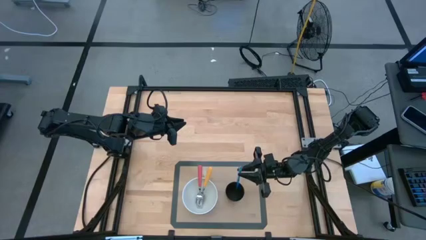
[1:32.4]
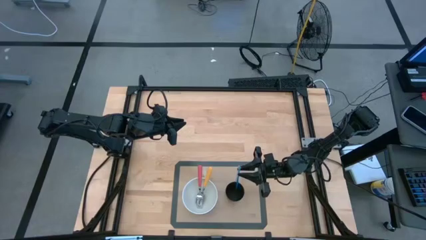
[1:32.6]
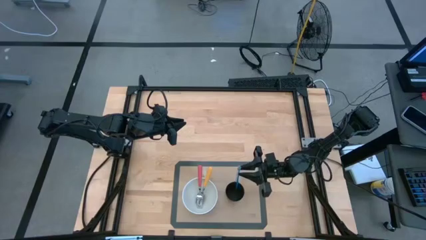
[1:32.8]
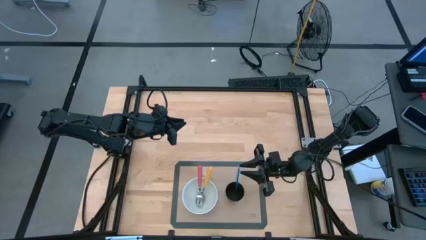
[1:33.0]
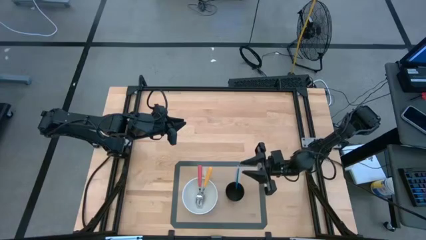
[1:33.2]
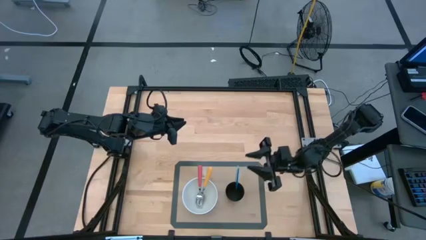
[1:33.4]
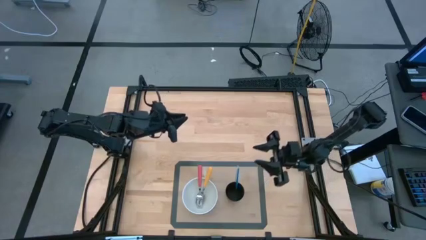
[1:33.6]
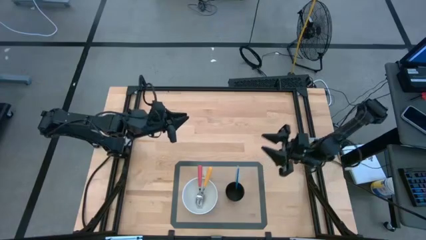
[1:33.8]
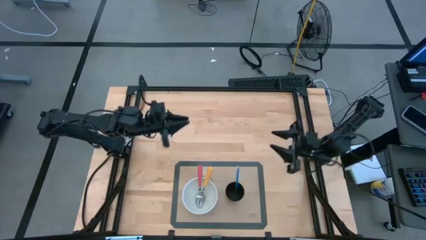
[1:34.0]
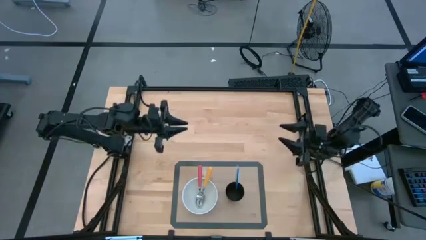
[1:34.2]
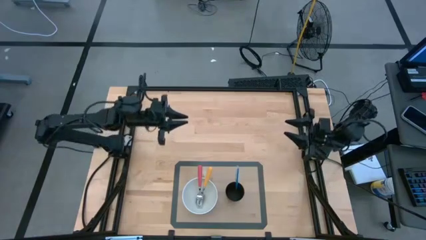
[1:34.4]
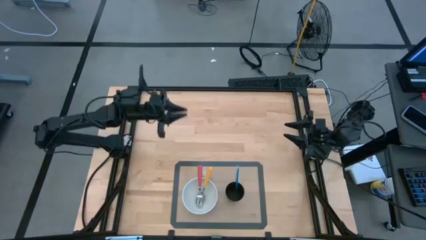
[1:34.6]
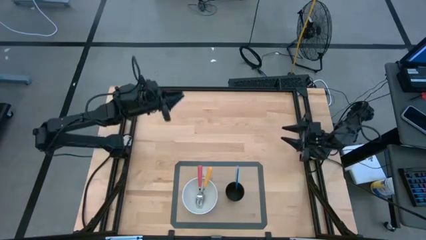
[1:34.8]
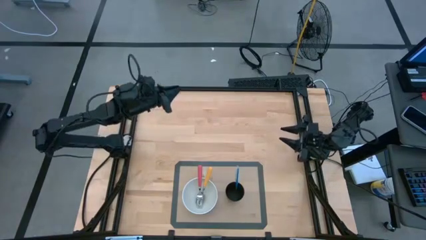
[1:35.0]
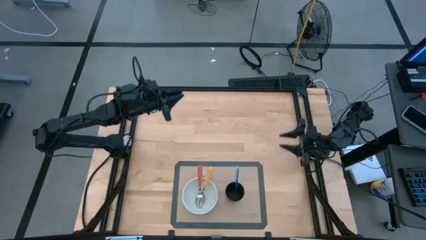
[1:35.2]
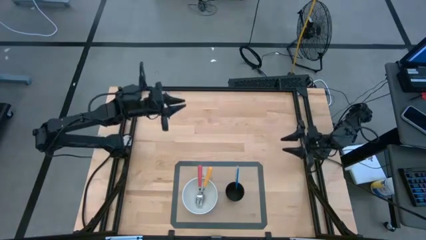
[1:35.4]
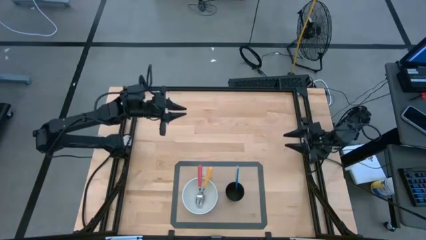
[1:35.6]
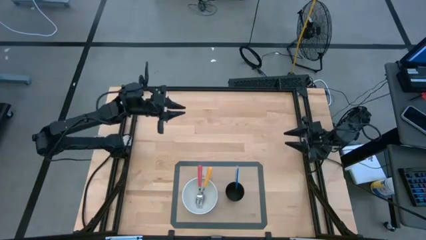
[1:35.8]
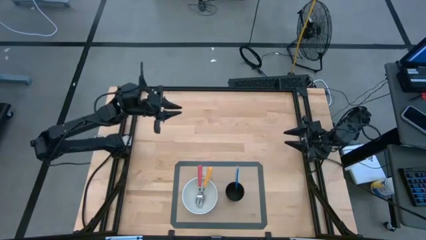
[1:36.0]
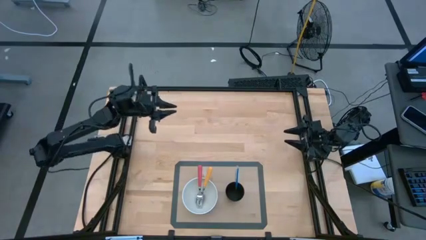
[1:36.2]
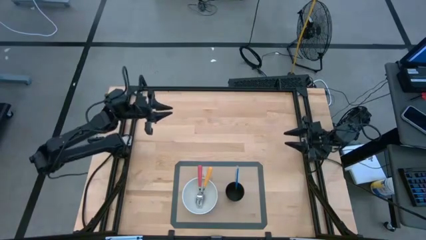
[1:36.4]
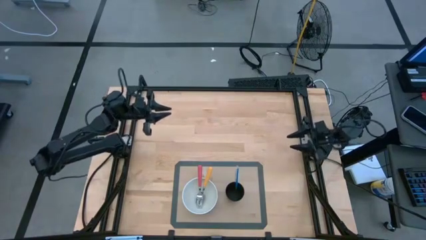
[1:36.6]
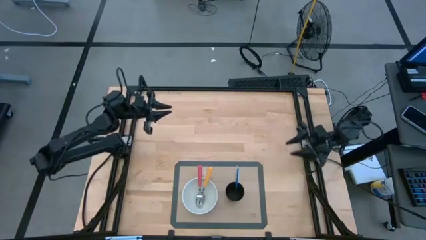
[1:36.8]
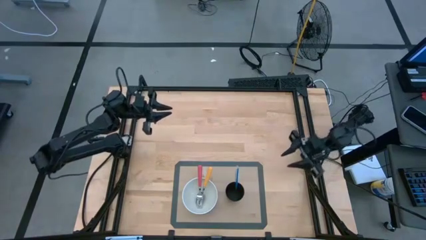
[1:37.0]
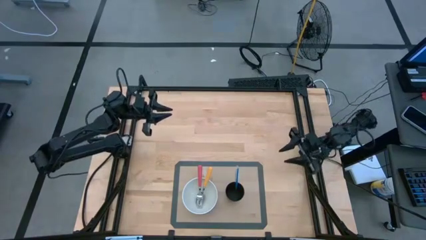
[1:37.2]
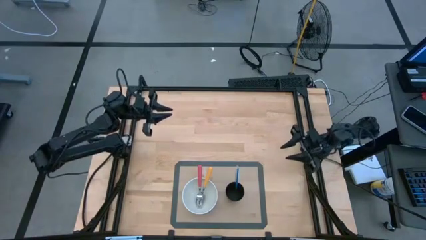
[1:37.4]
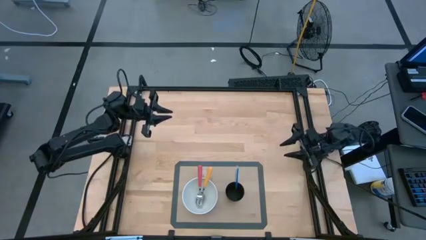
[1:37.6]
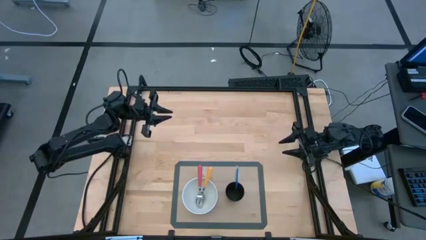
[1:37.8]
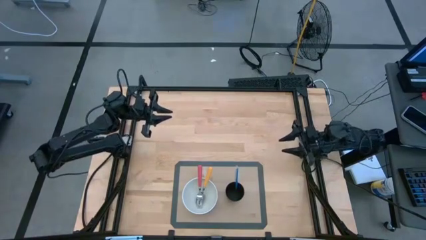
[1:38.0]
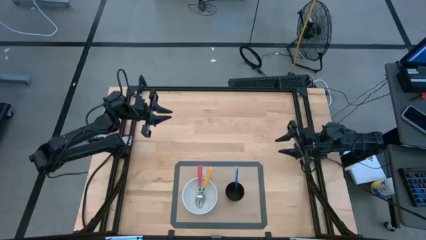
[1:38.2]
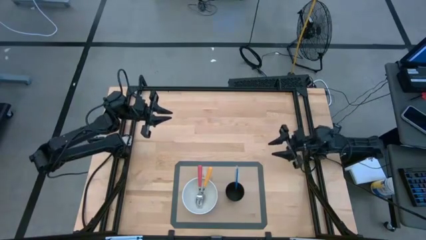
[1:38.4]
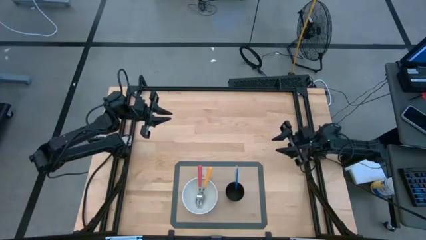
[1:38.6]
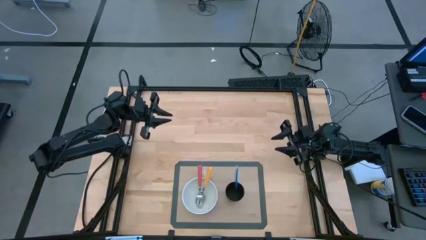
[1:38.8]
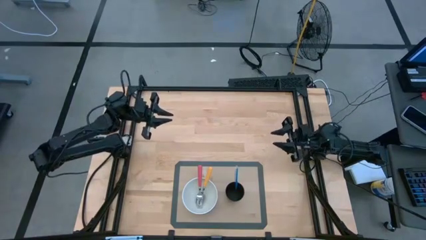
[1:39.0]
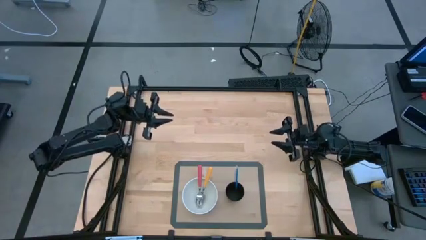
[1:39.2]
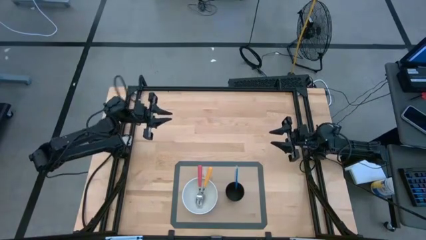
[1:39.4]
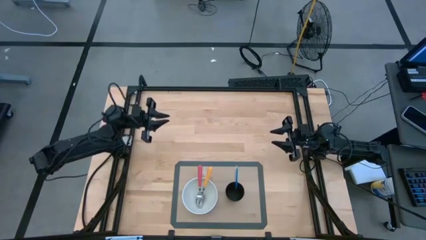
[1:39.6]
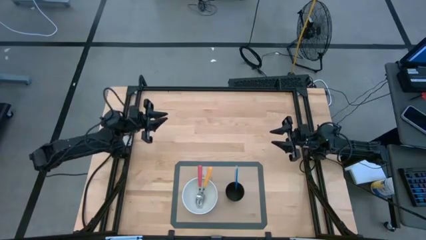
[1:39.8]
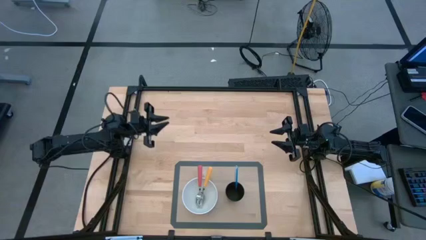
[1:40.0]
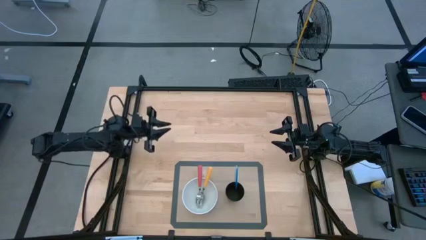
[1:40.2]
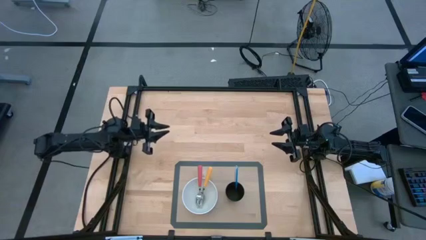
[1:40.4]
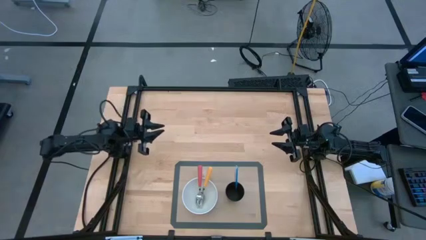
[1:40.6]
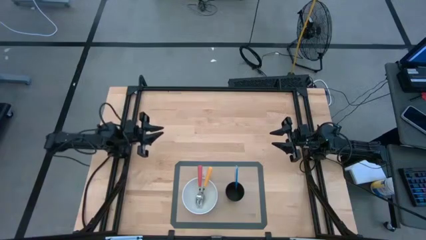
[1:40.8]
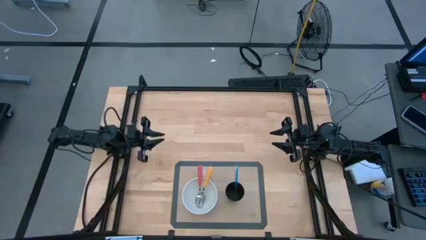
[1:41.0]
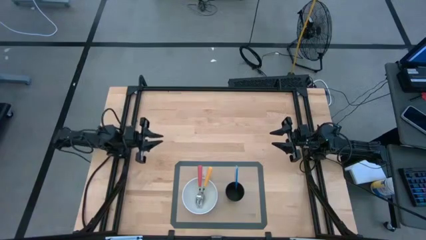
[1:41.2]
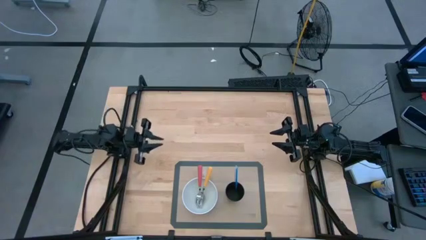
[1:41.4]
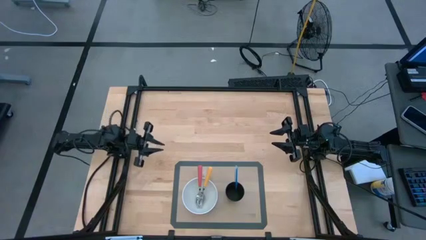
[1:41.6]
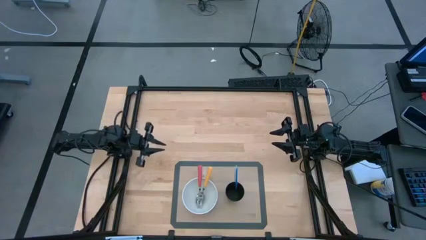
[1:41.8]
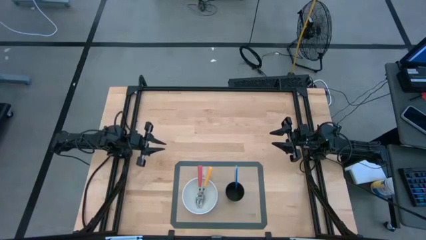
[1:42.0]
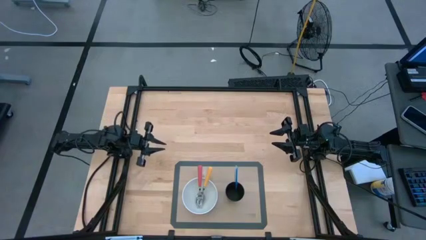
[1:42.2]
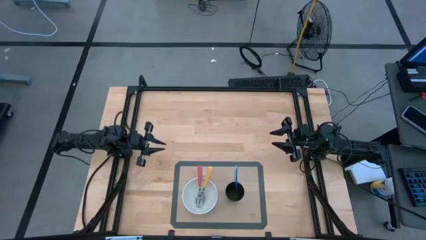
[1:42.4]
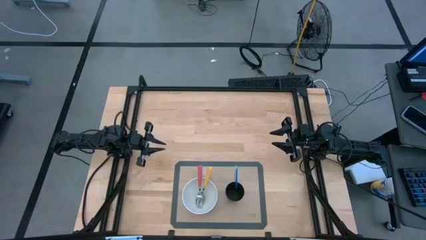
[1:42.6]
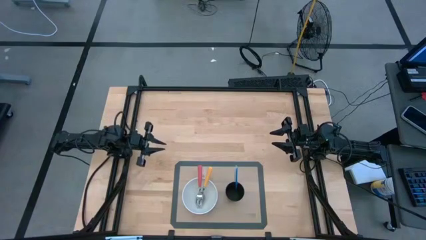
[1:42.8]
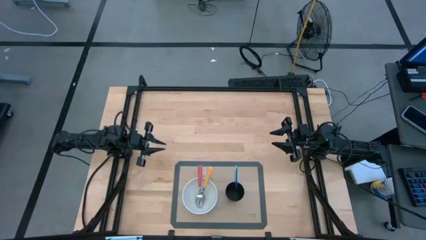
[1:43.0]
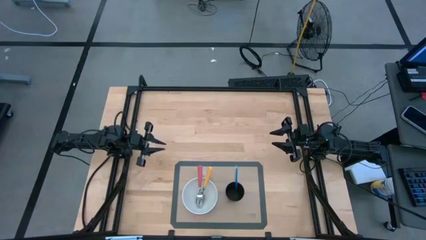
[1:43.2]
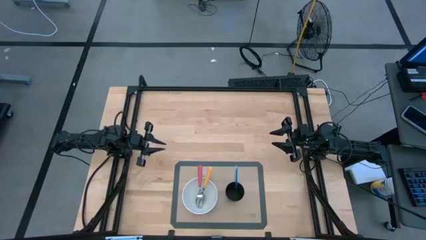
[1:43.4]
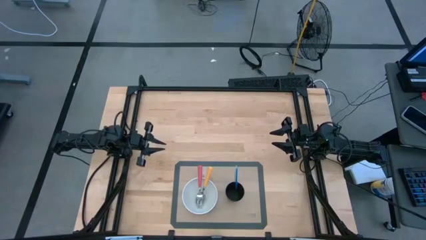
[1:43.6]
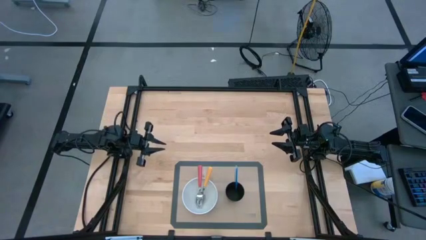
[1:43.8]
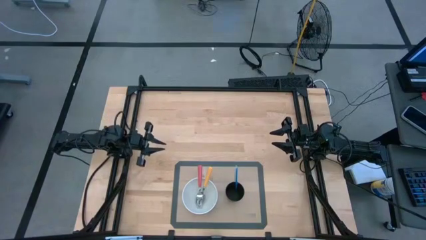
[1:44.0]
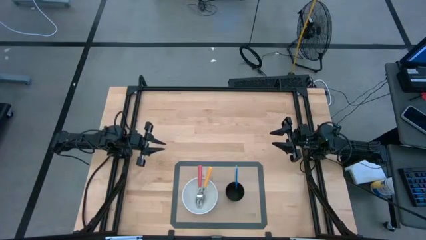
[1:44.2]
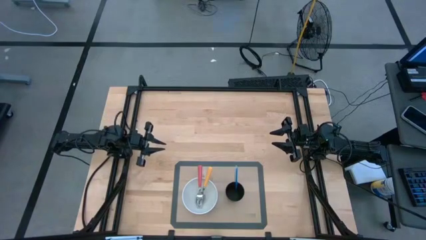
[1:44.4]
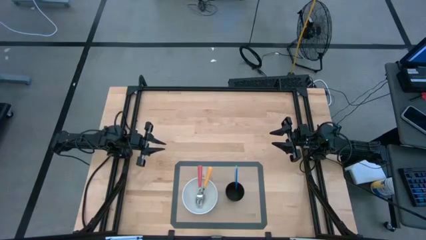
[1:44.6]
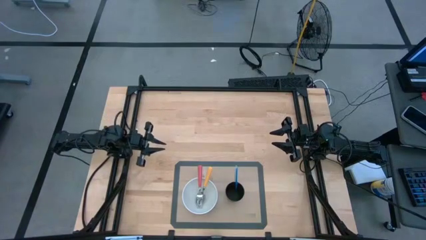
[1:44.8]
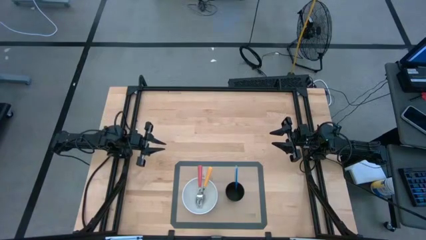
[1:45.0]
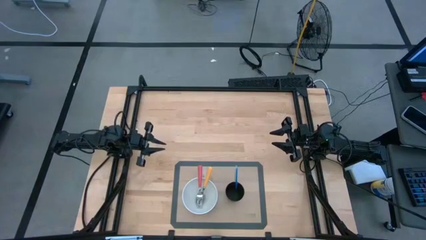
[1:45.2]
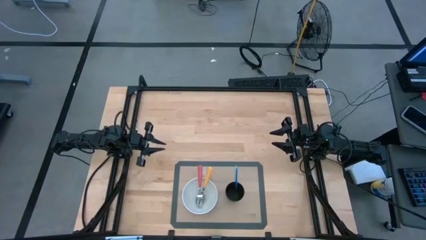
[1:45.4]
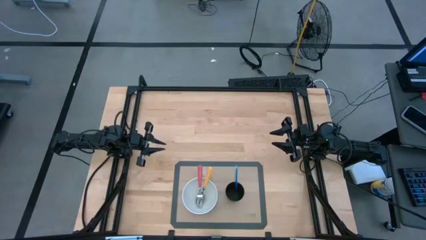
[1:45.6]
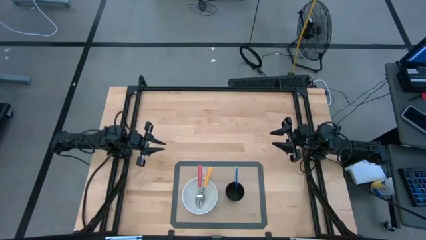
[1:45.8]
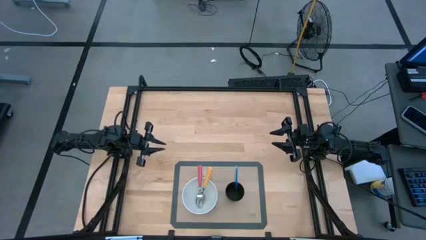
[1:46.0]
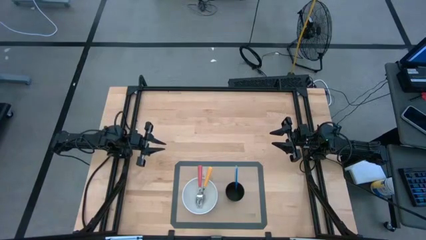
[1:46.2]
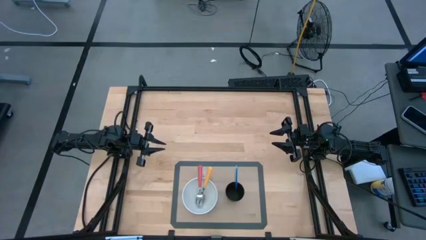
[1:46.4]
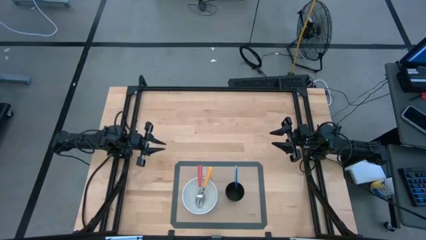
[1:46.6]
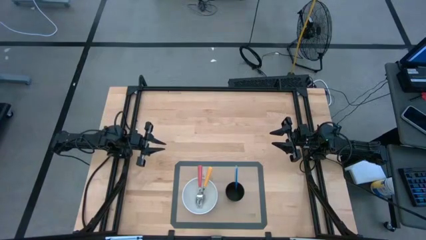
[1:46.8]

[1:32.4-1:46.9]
Task: Pick & Place Utensil
Return to Home Position

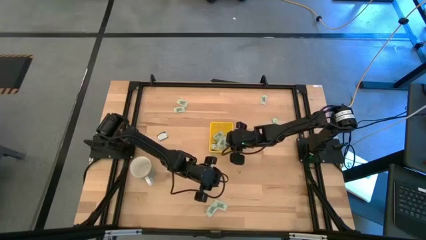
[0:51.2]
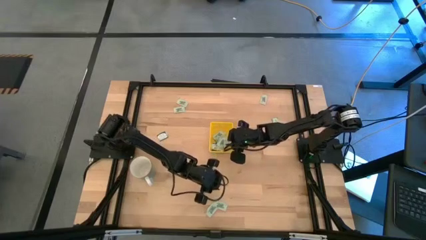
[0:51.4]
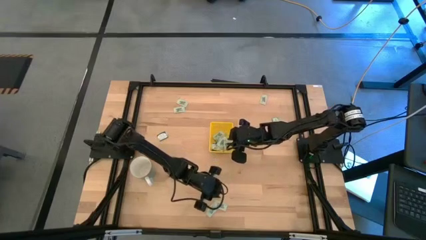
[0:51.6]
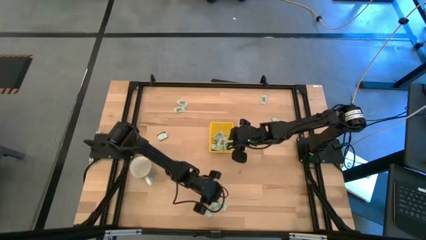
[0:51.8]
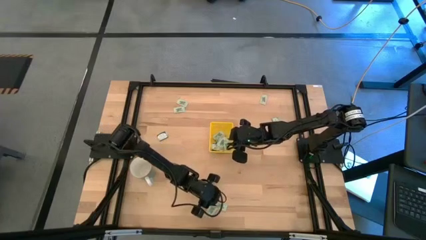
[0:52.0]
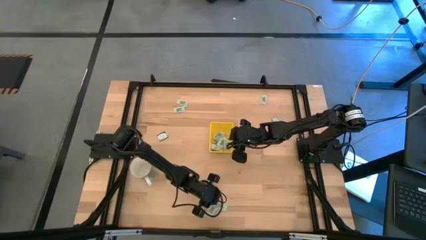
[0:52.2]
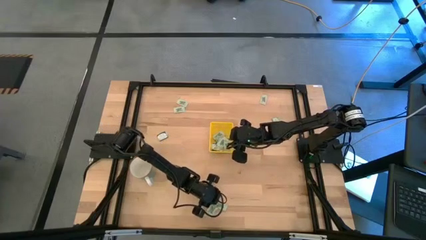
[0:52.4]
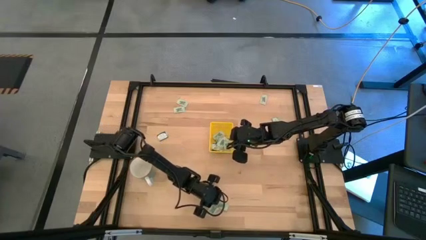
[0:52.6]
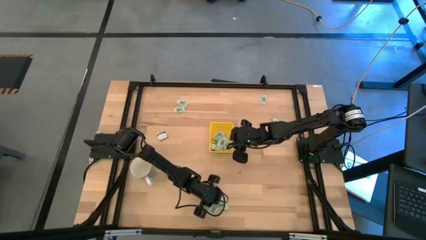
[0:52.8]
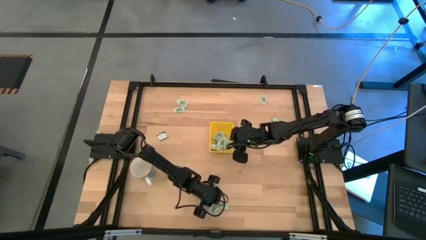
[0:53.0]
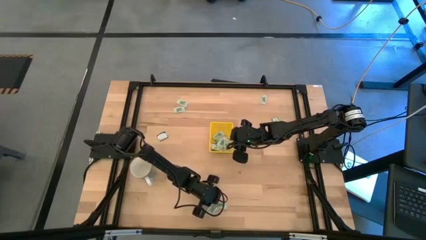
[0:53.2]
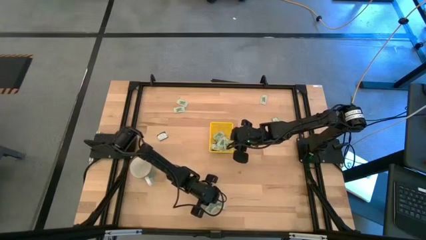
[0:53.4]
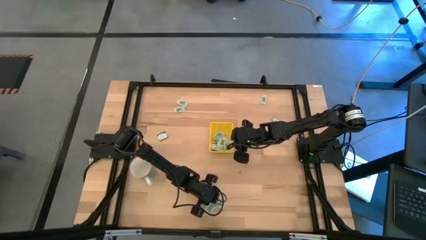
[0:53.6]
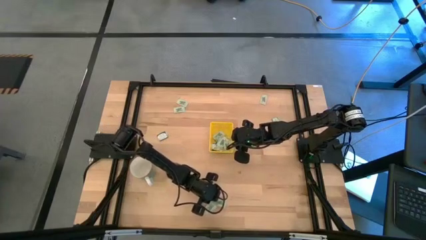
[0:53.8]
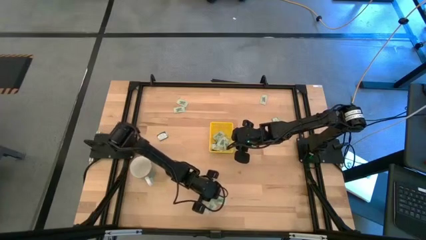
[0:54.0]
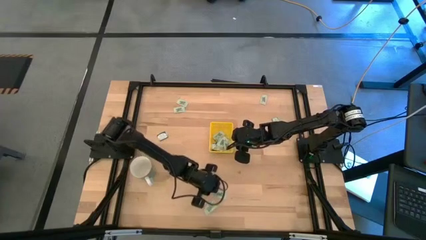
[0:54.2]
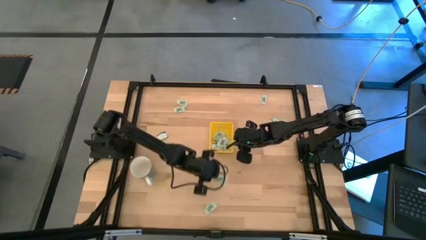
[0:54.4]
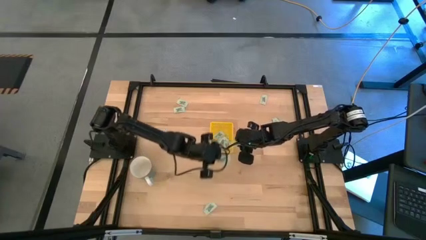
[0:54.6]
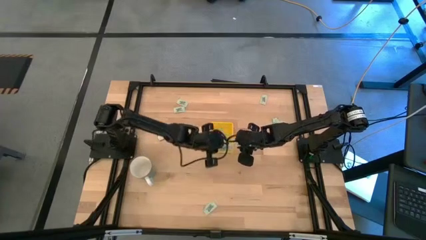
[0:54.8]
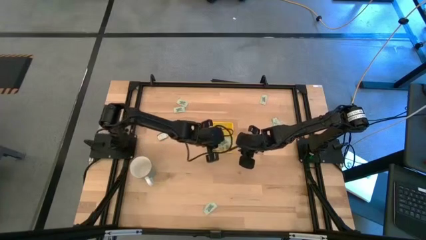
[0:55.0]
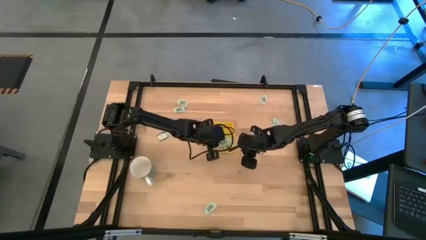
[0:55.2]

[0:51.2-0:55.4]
Task: Pick and place Stevia / Truvia into bins
Put the white stevia packet into the yellow bin
